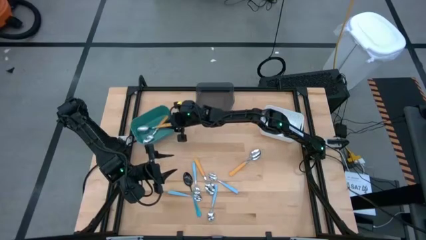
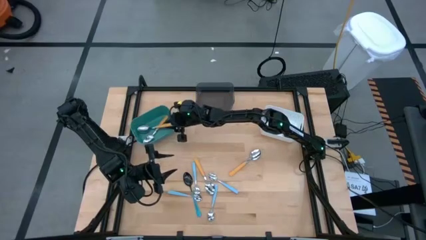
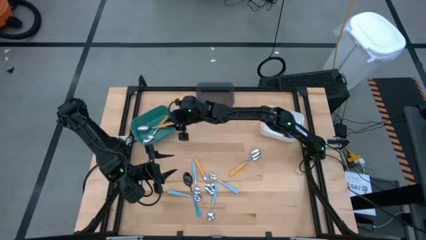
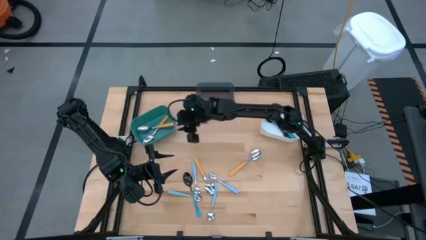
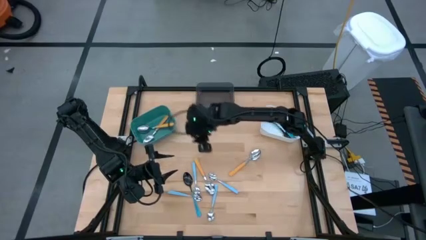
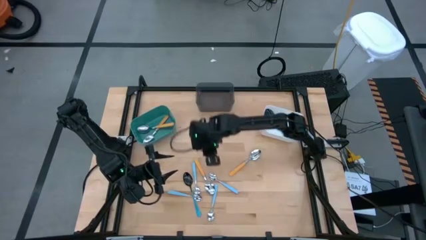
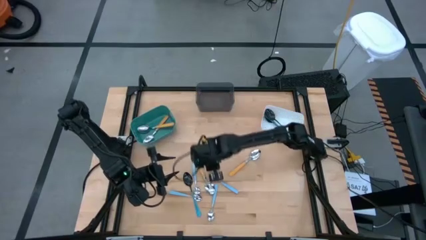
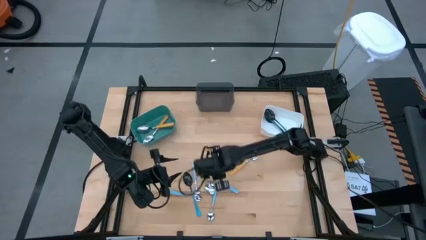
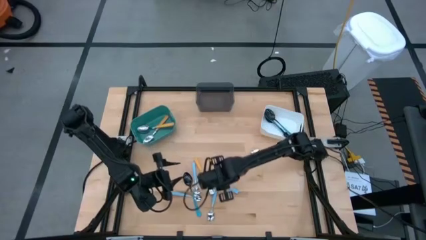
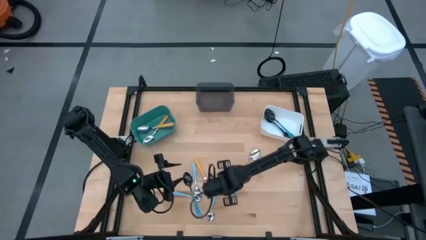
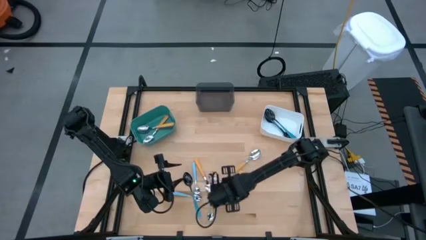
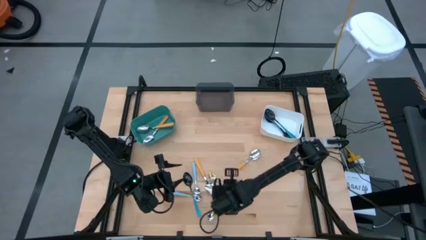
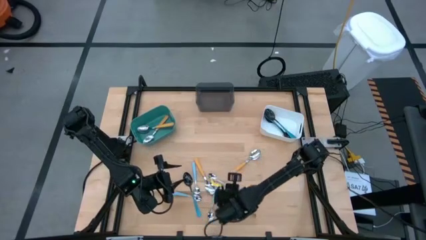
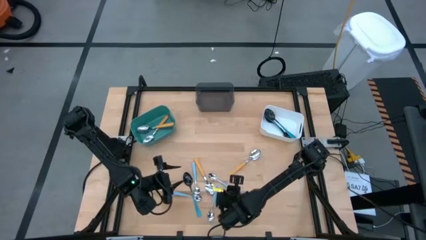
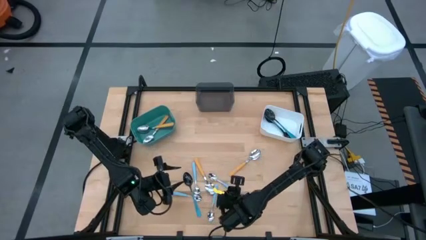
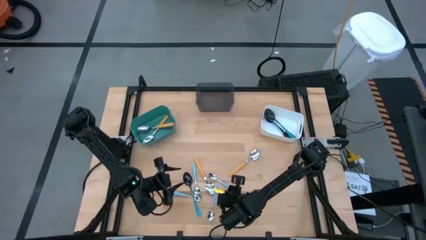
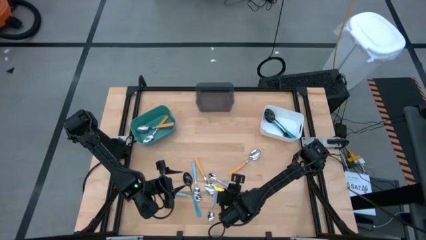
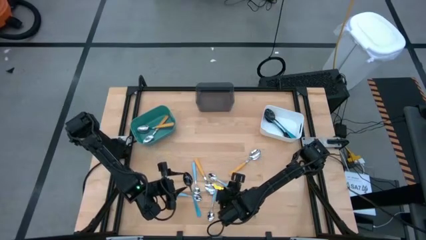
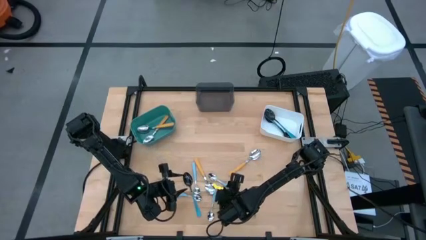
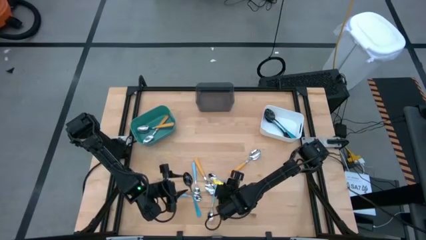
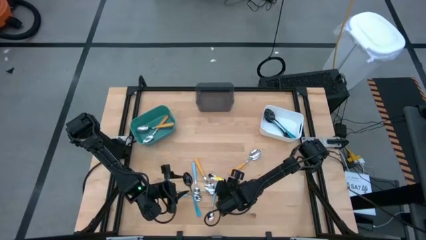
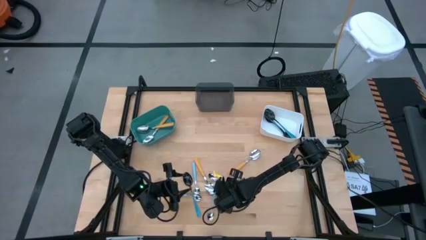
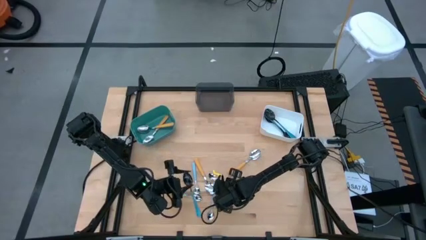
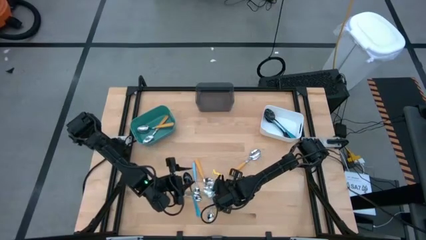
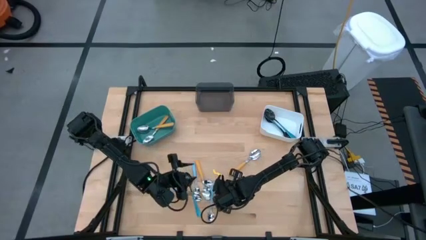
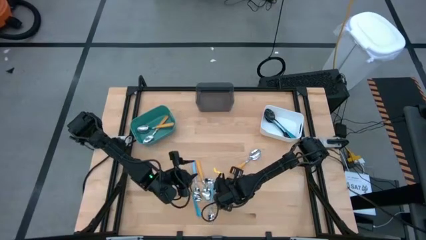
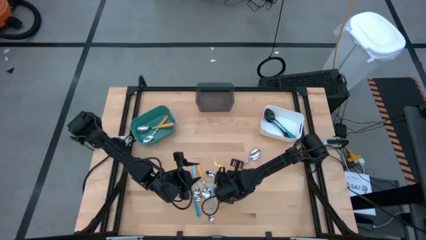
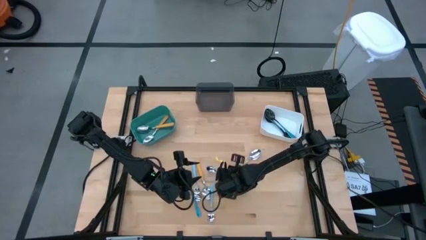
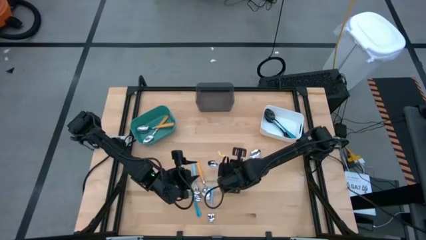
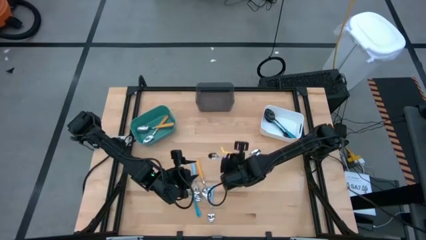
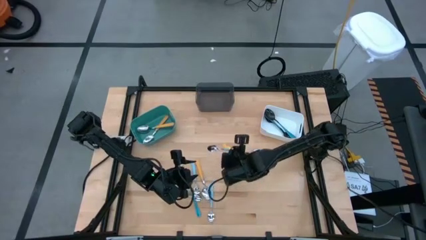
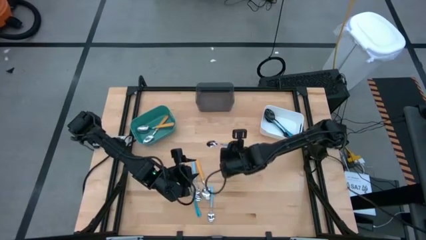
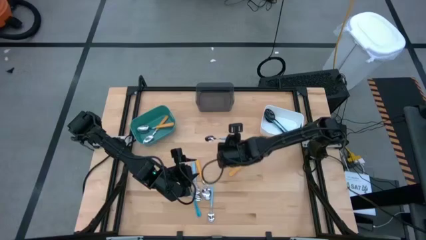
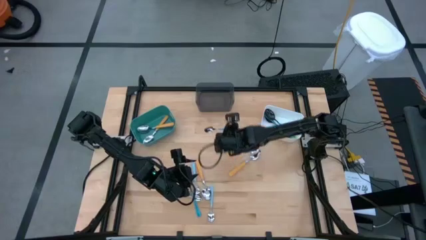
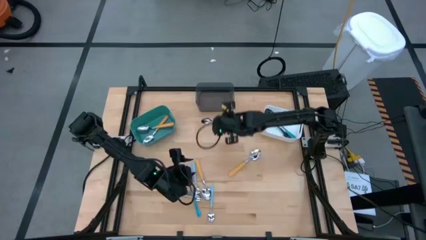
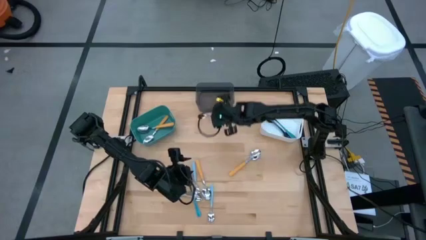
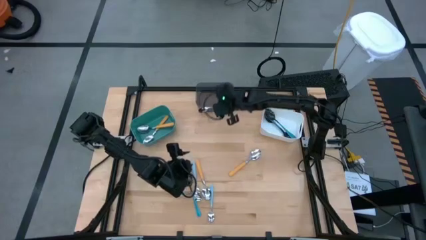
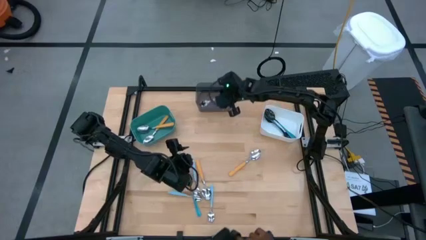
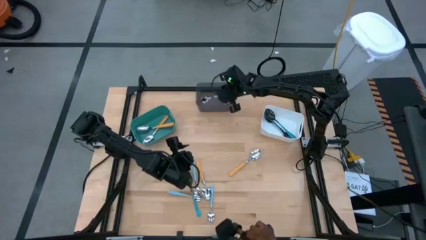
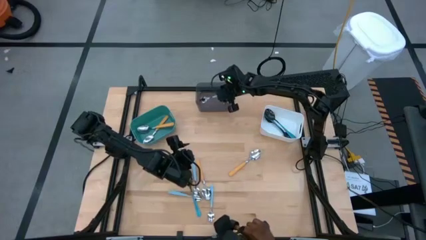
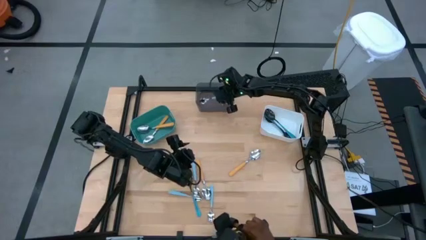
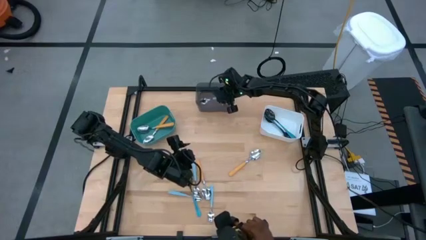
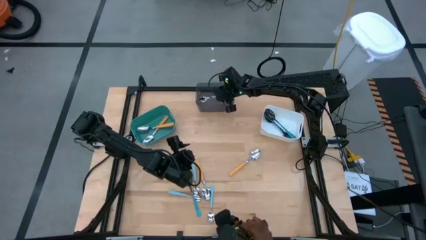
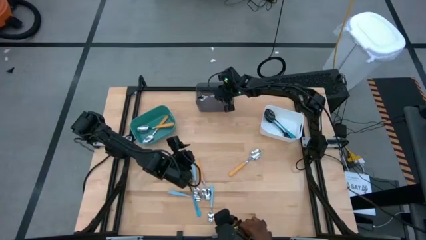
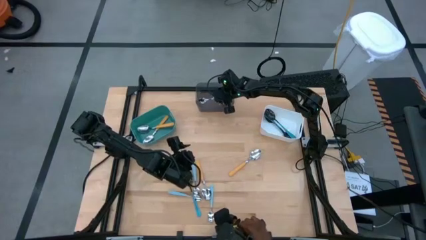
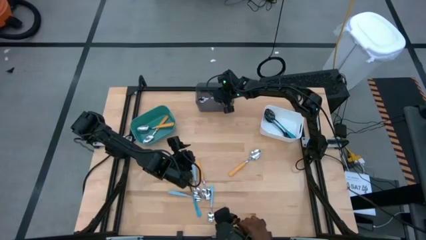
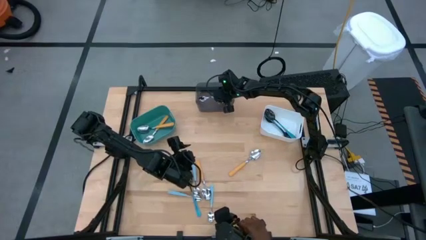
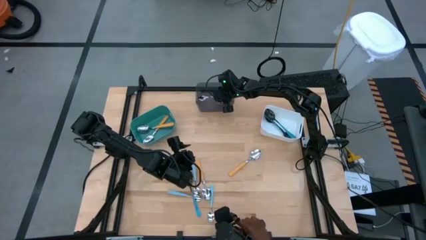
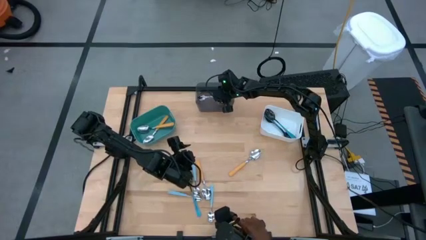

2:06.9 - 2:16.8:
Task: Sort silverware by color (type)
Put the light blue spoon into the black bin

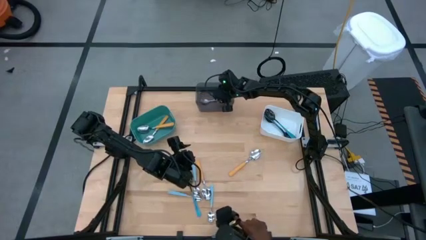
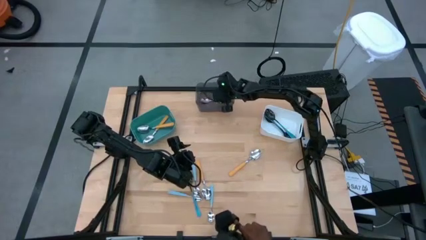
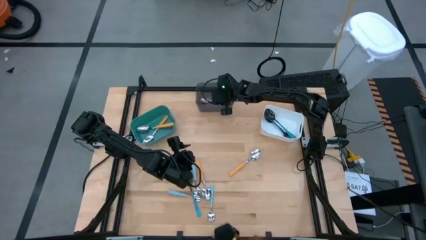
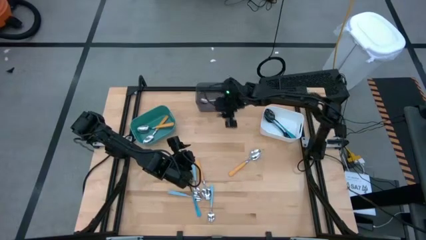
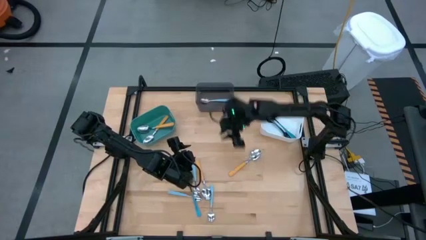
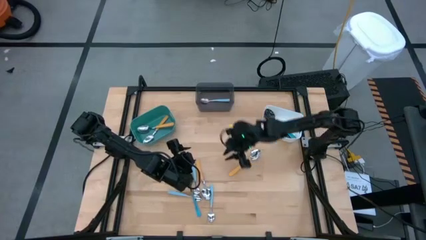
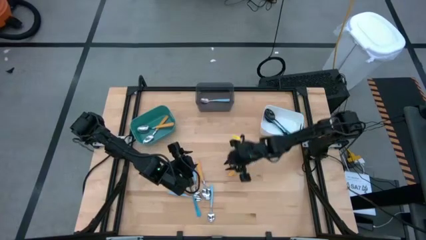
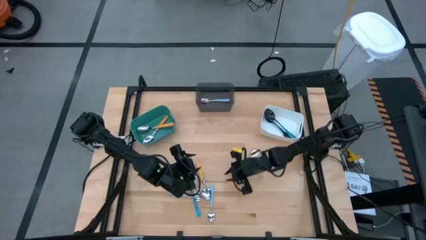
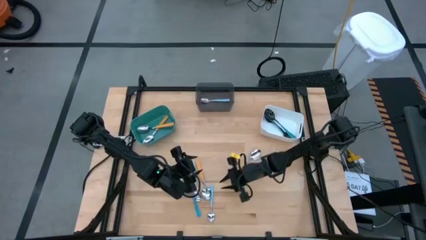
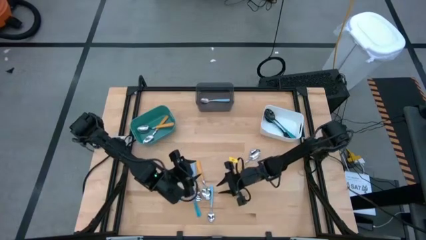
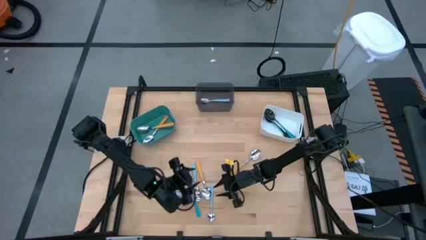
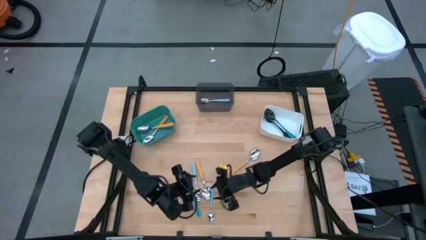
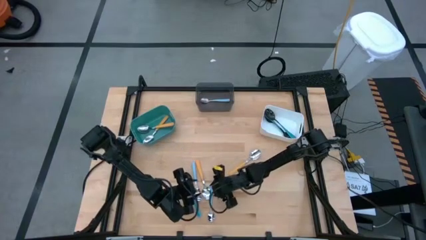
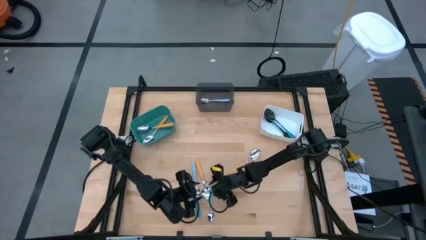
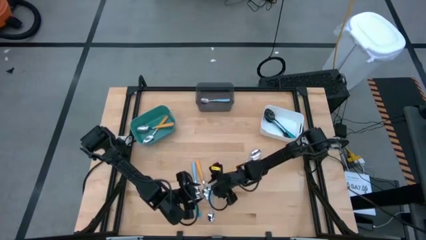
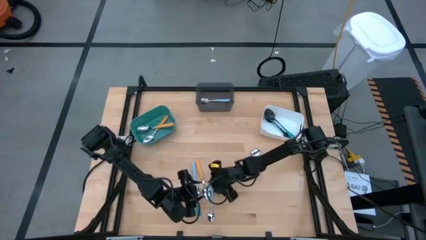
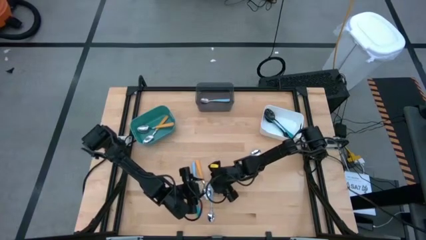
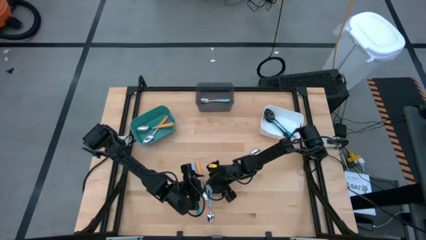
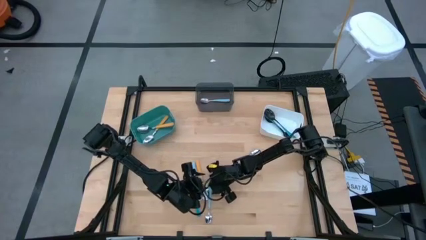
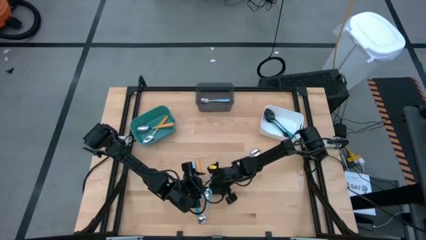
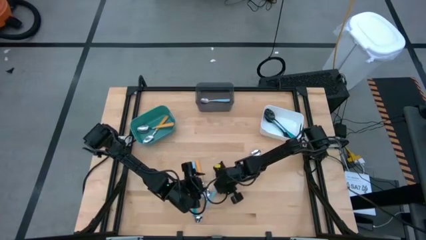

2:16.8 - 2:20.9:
Put the light blue spoon into the black bin
